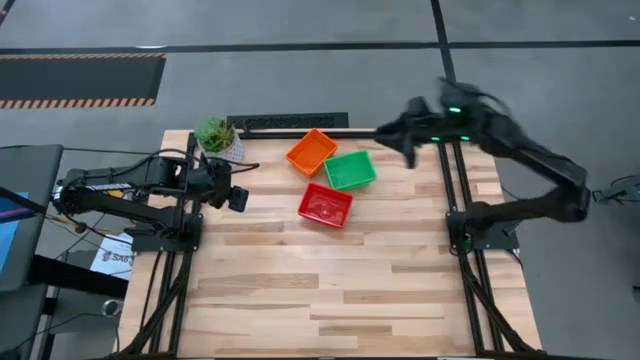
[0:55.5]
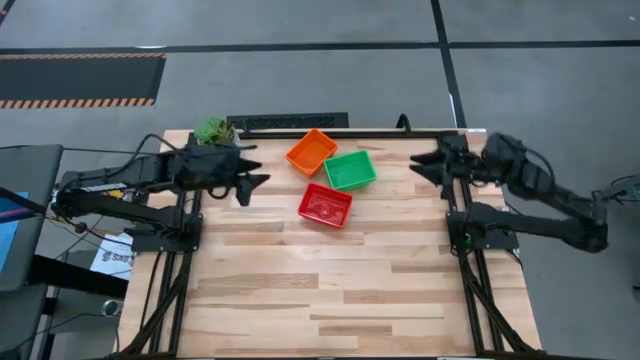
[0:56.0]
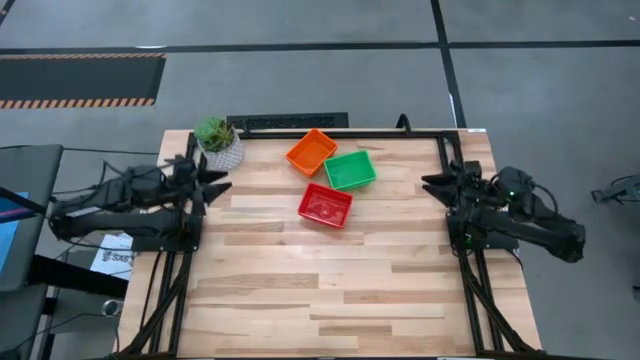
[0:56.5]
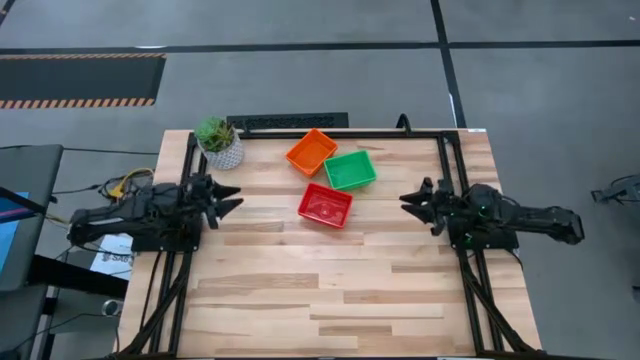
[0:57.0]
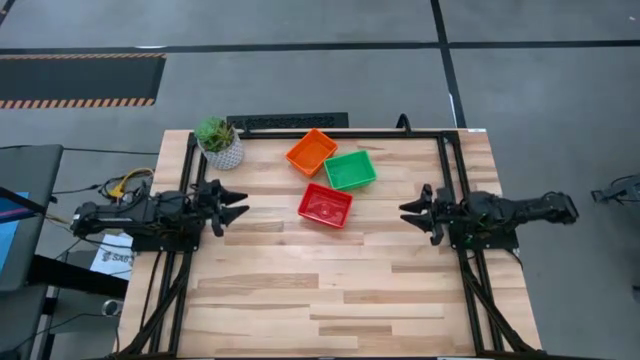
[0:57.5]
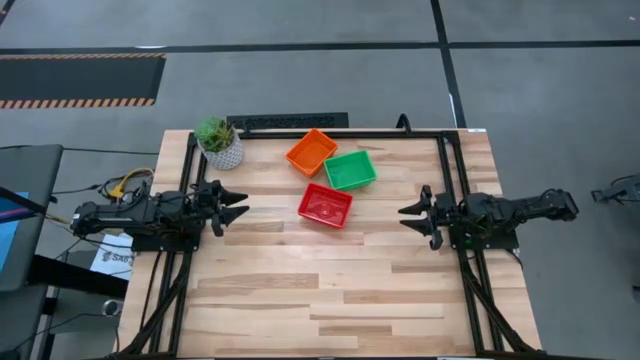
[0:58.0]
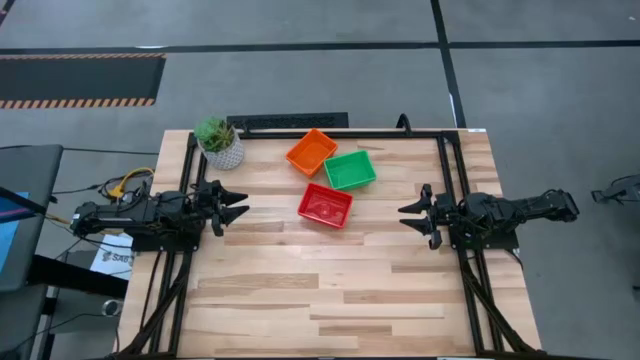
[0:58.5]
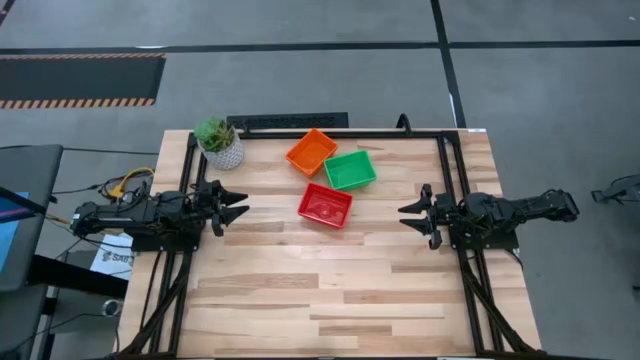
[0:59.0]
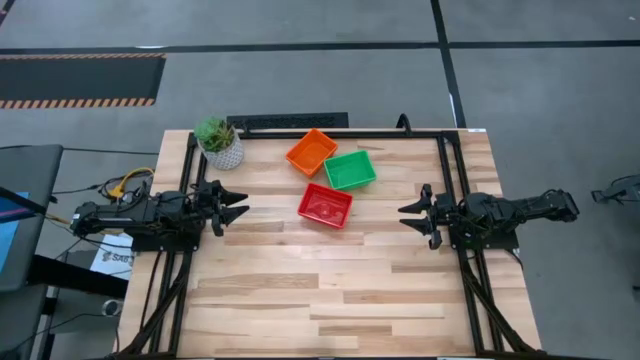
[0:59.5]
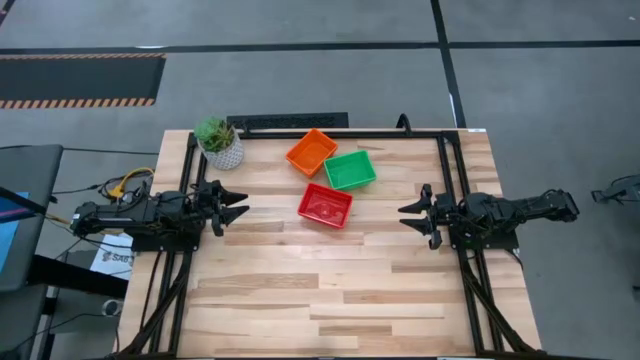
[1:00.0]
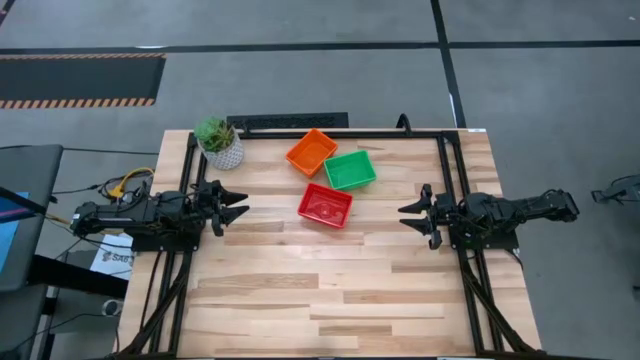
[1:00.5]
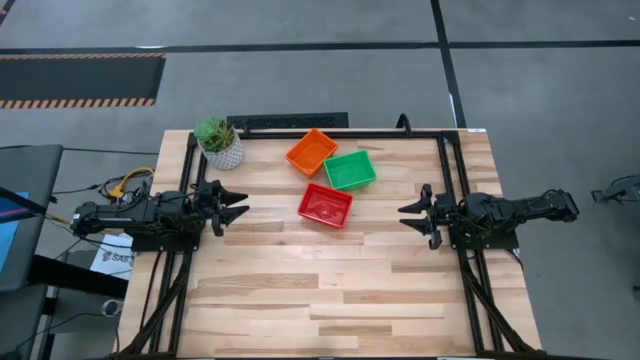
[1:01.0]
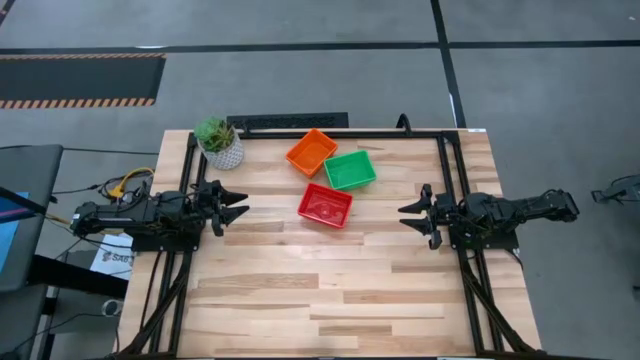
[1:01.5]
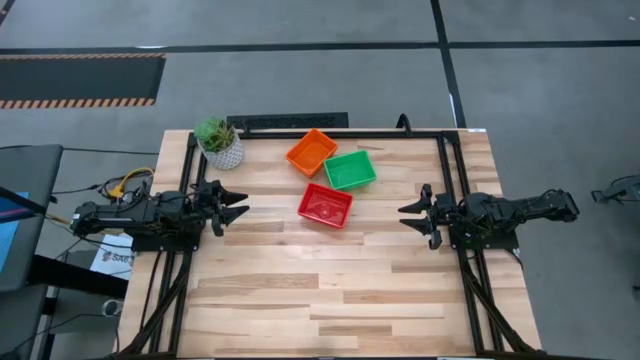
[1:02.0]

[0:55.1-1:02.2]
Return to Home Position
